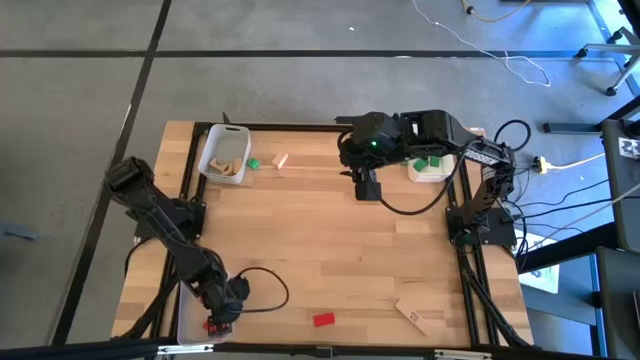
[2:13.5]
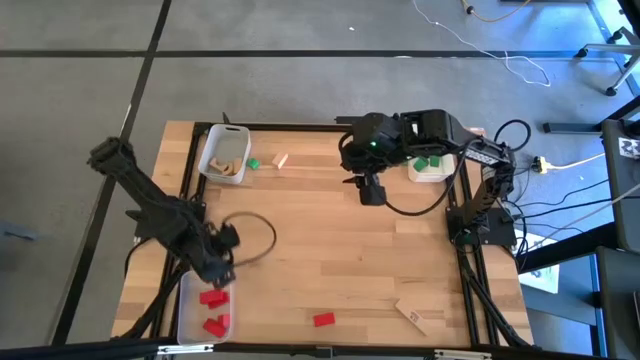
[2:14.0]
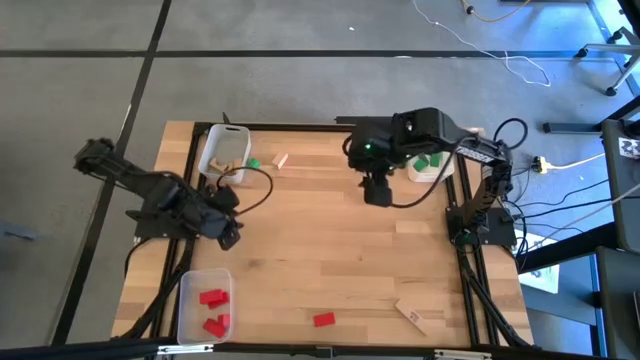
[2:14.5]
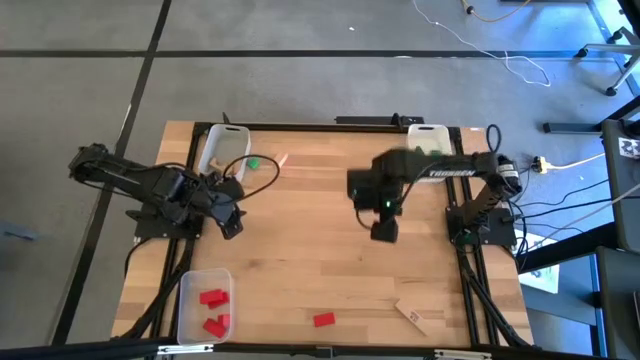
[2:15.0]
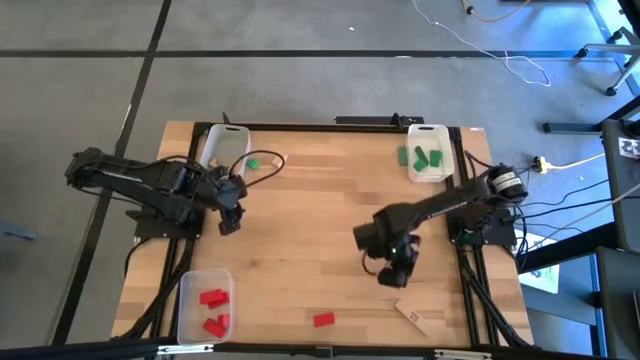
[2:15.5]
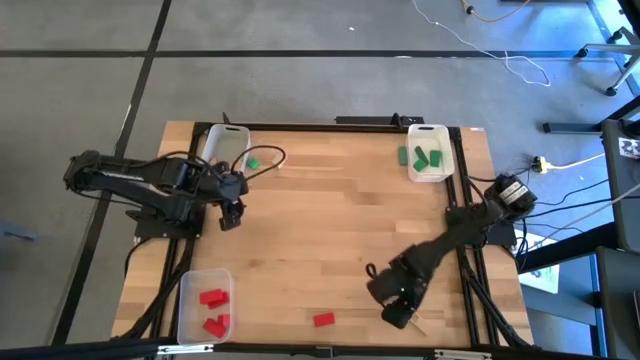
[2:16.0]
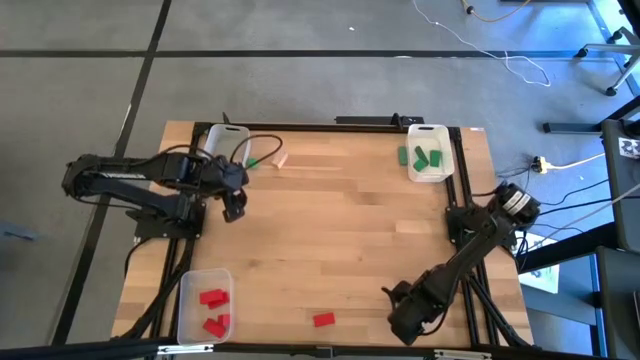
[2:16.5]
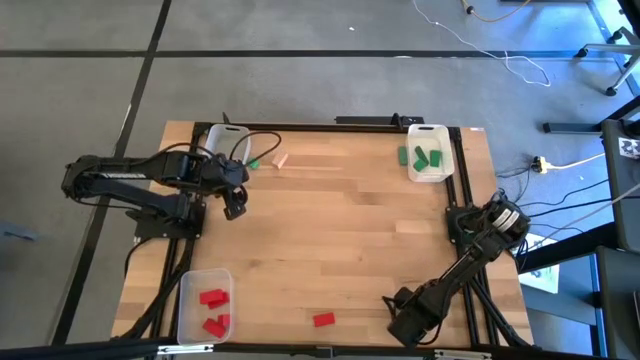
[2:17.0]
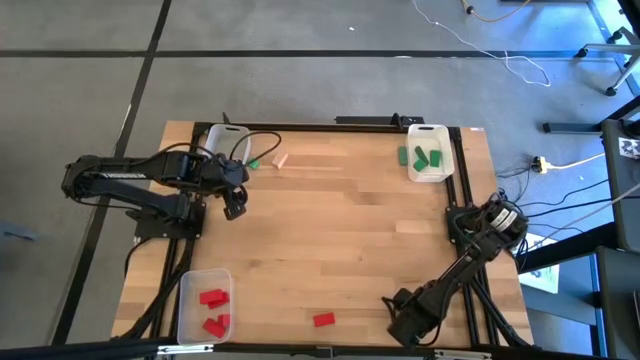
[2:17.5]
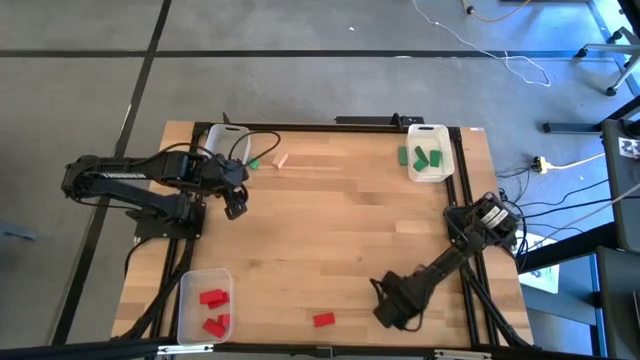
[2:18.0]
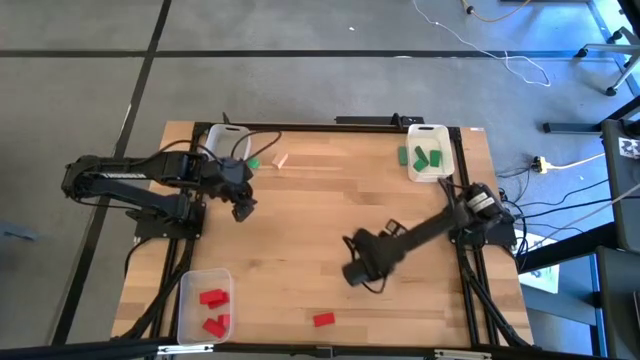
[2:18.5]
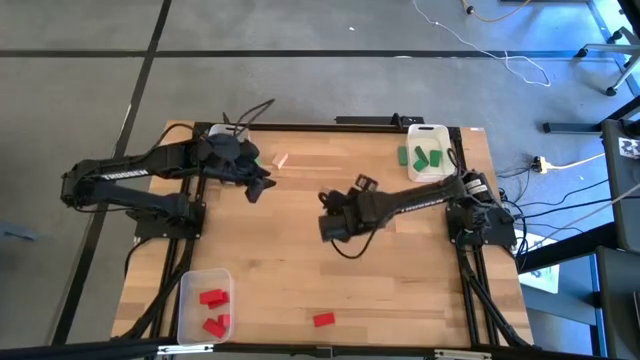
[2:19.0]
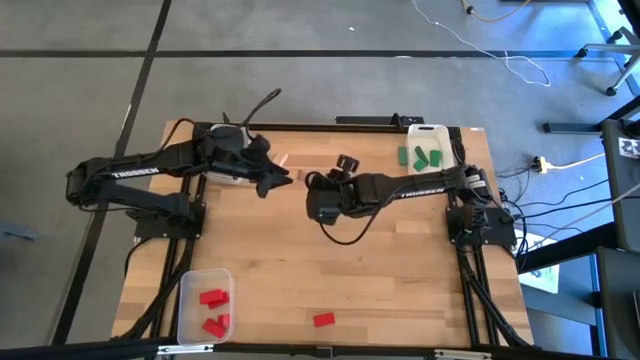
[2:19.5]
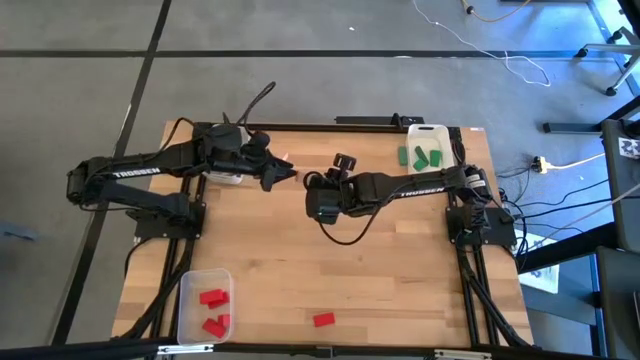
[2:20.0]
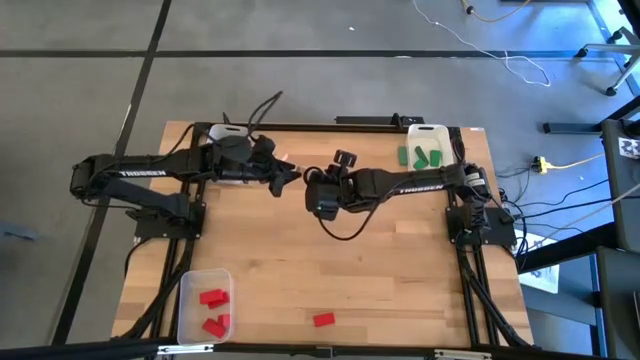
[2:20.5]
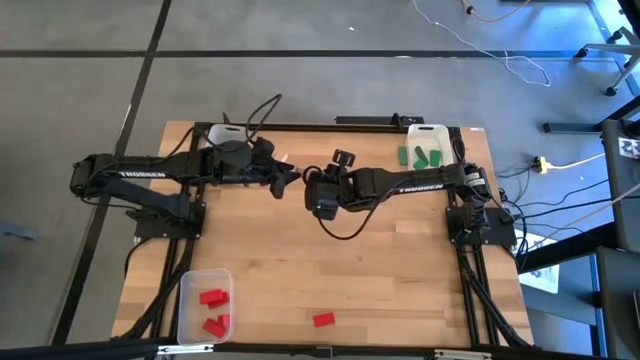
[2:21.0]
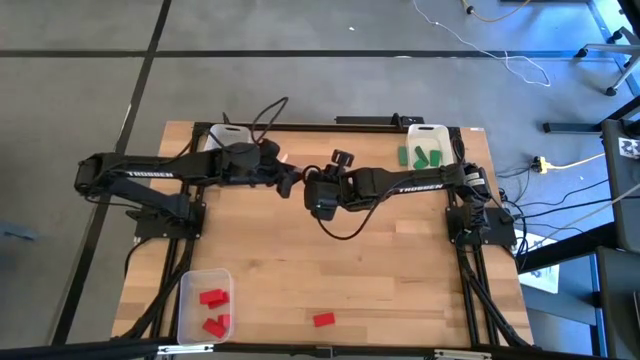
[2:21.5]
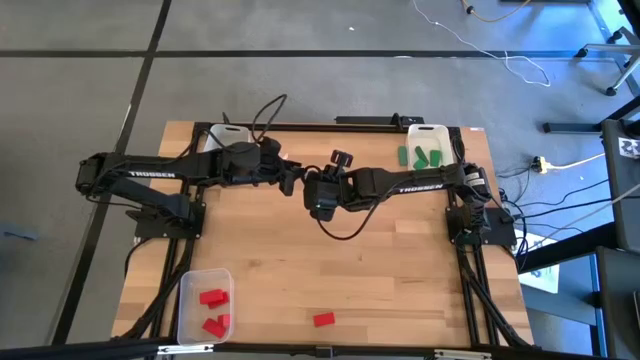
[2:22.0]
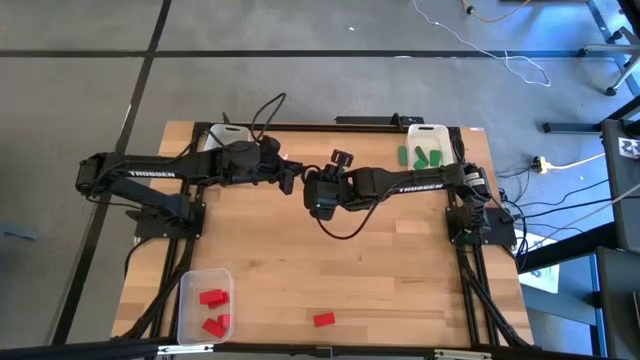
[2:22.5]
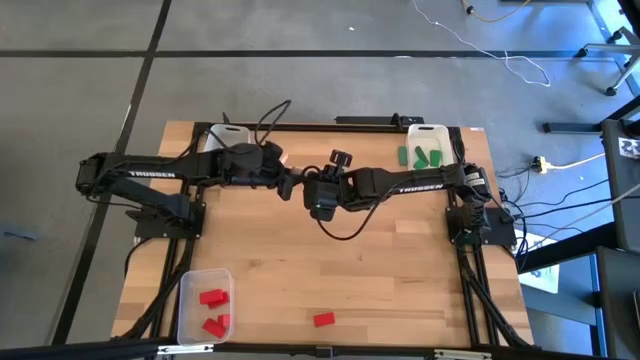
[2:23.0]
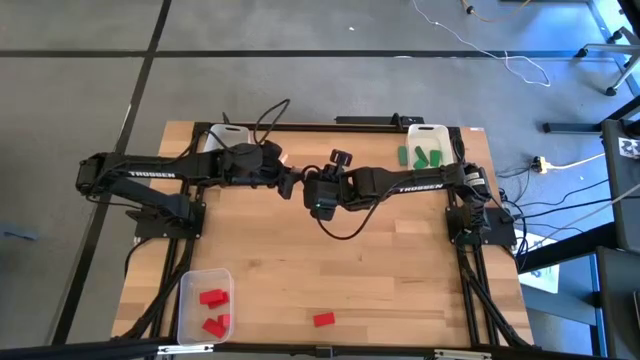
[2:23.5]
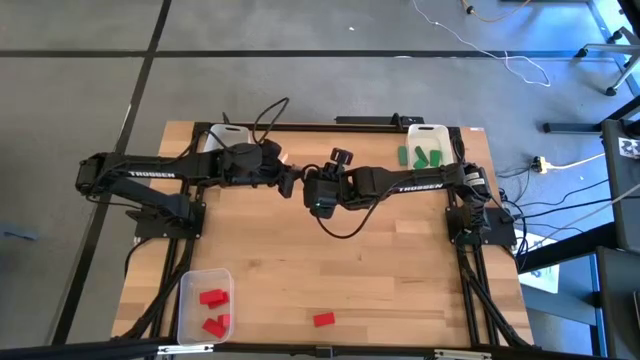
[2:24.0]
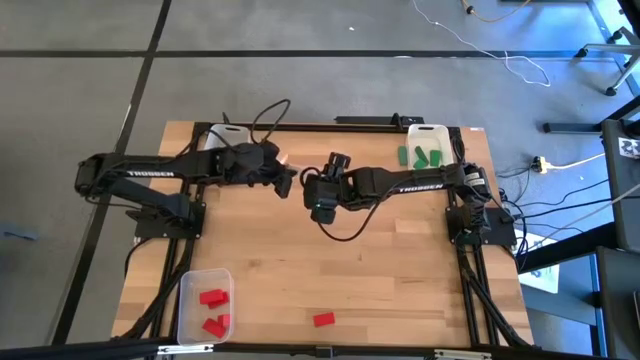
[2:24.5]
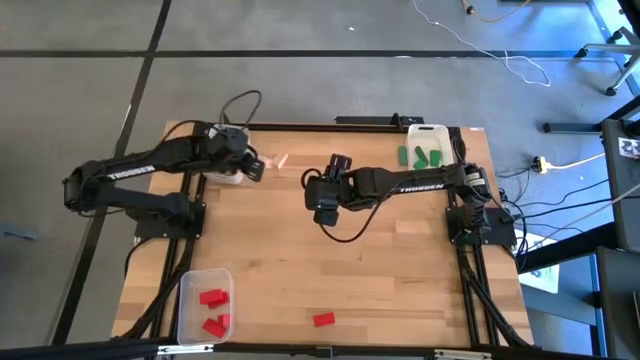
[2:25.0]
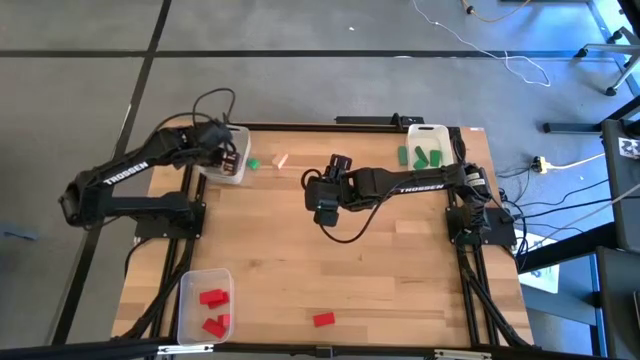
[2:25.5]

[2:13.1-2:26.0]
Task: Sort & place blocks by color
Put the brown block into the transparent bin

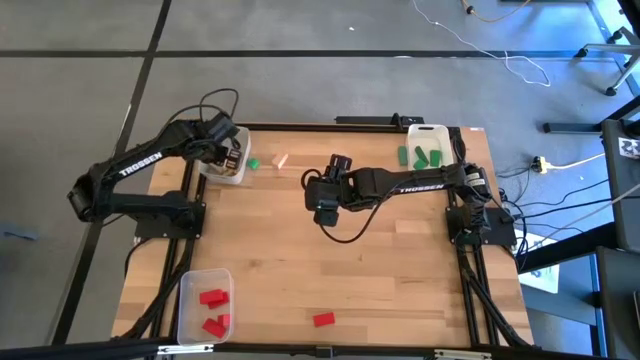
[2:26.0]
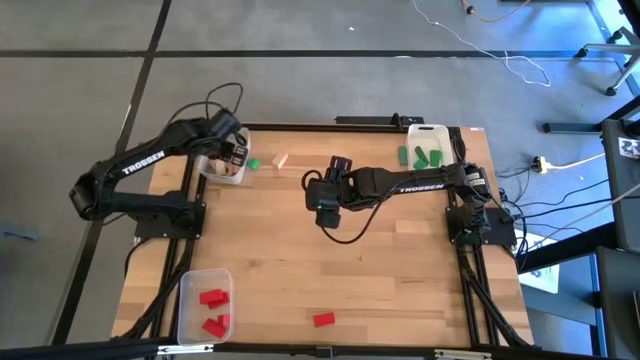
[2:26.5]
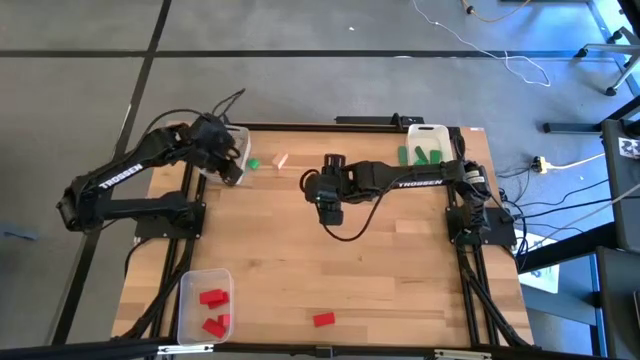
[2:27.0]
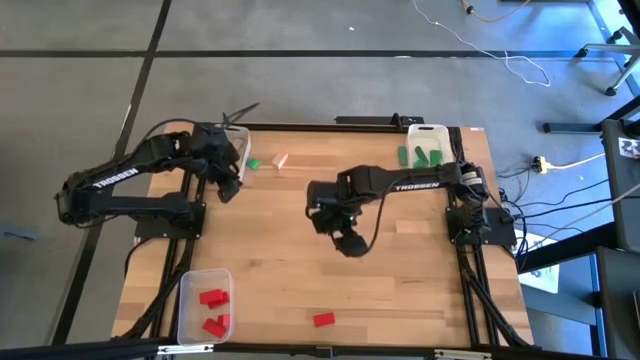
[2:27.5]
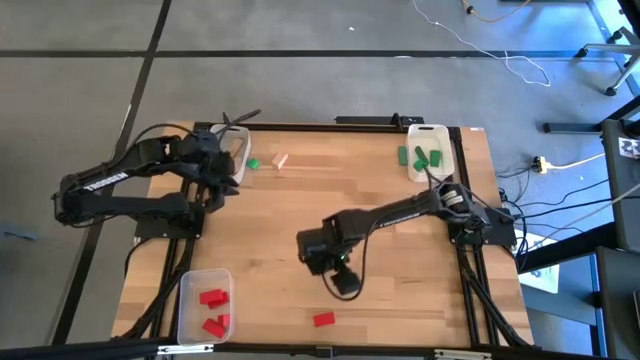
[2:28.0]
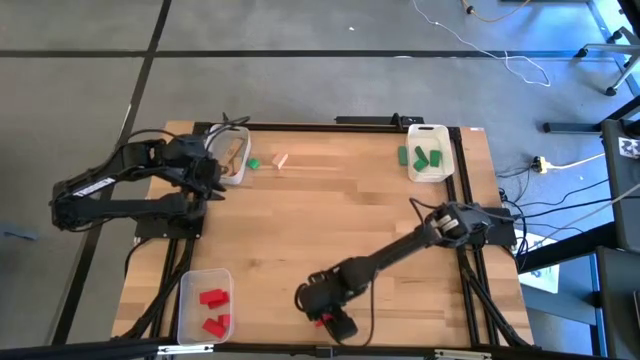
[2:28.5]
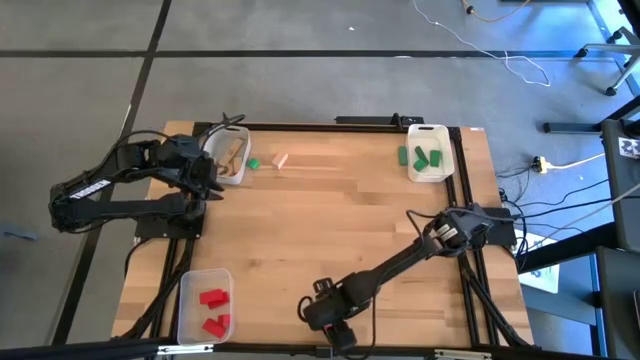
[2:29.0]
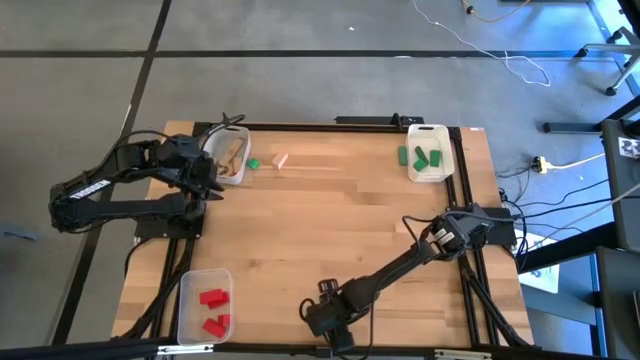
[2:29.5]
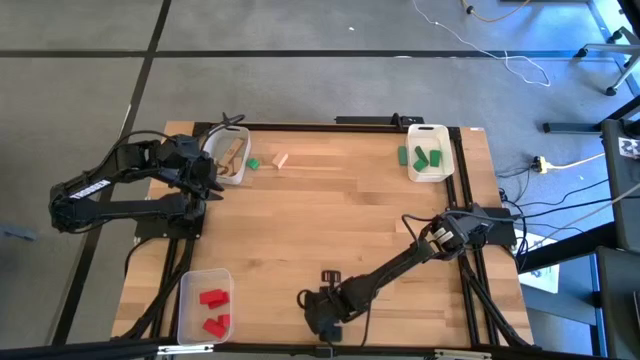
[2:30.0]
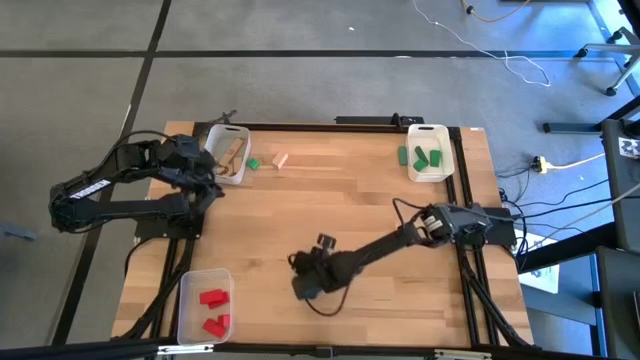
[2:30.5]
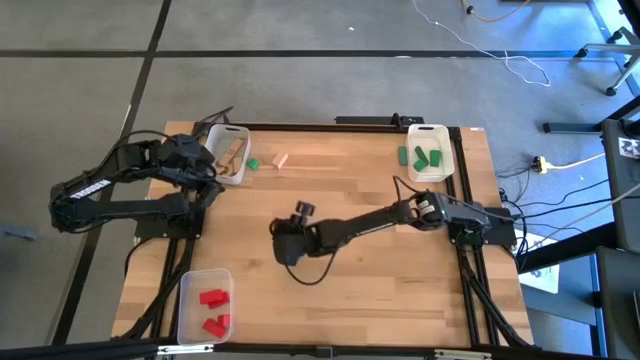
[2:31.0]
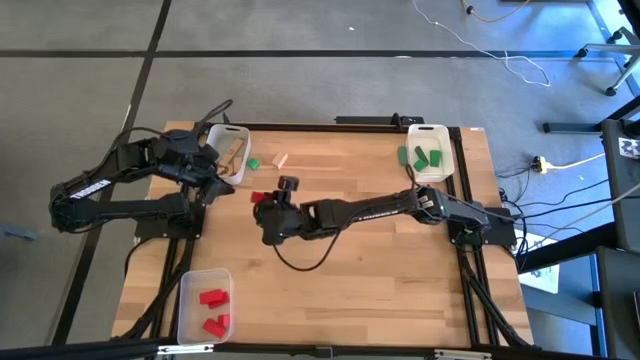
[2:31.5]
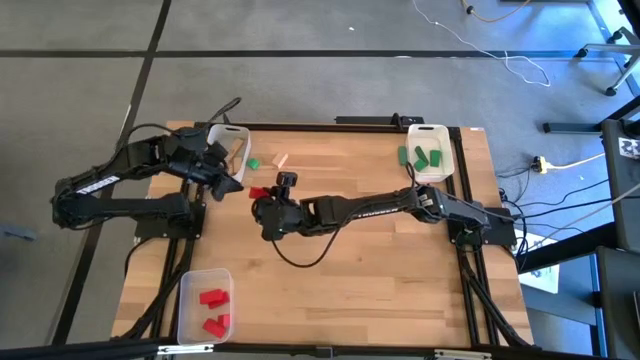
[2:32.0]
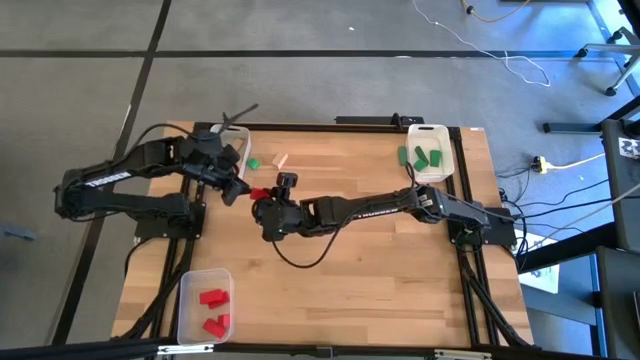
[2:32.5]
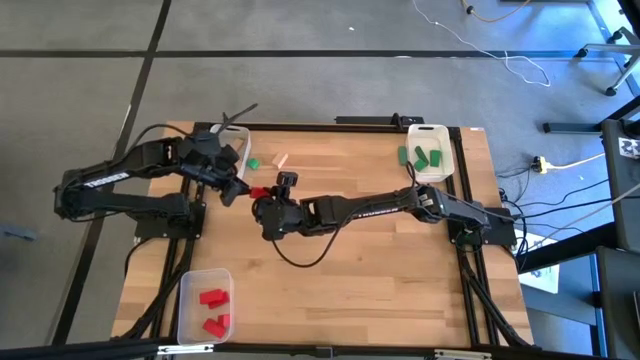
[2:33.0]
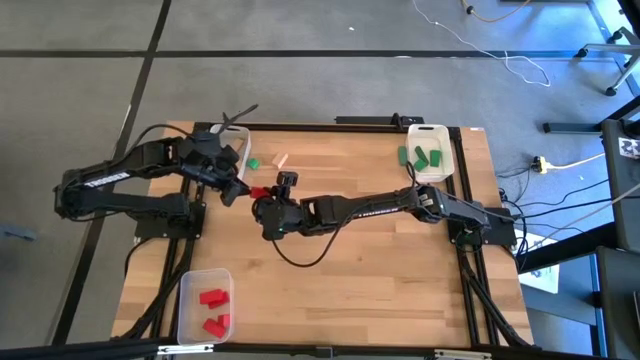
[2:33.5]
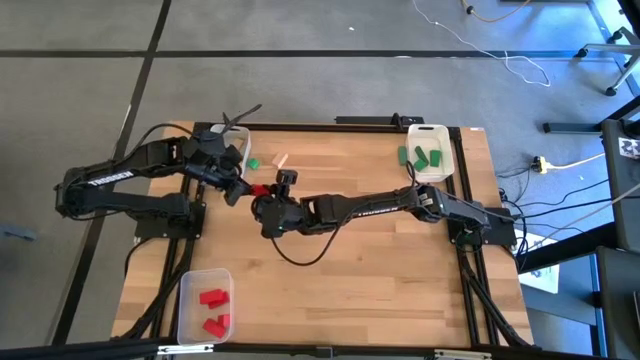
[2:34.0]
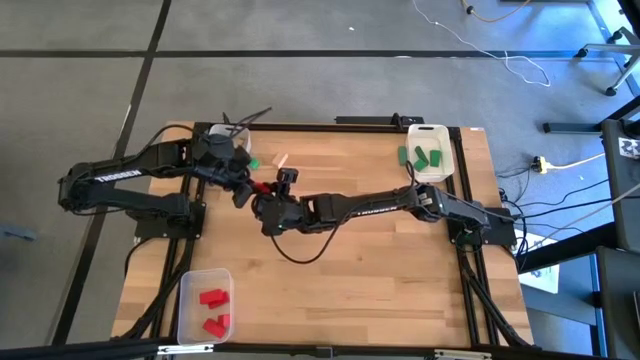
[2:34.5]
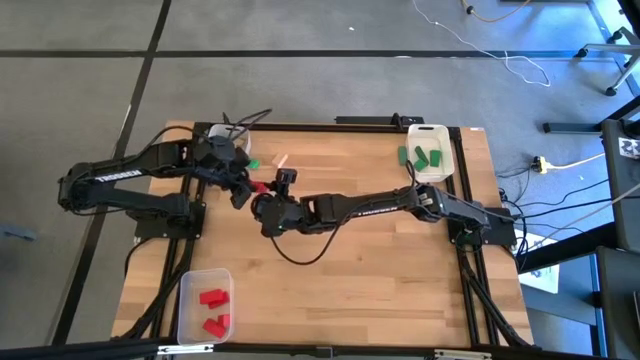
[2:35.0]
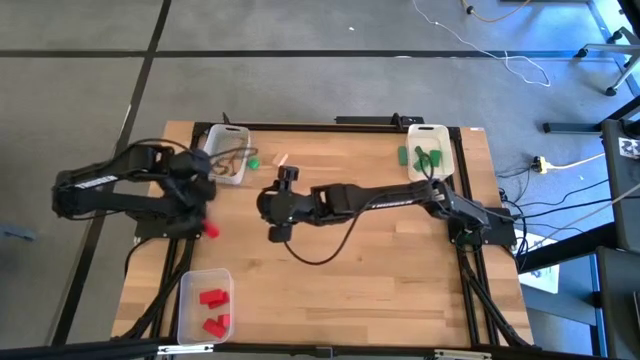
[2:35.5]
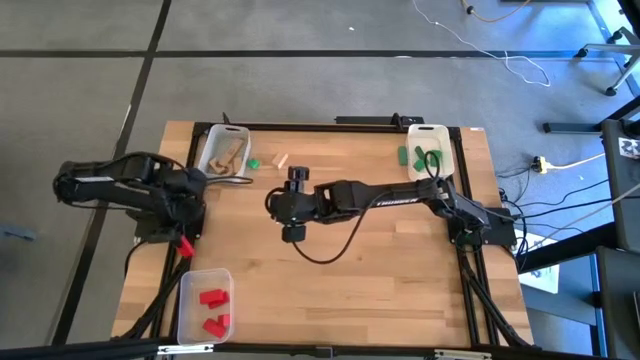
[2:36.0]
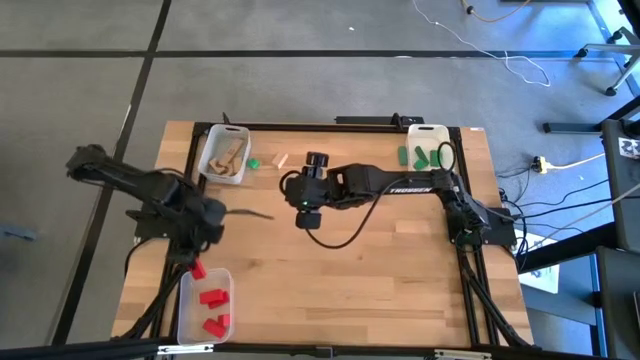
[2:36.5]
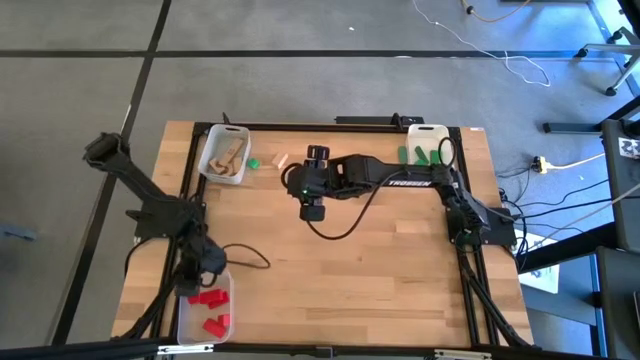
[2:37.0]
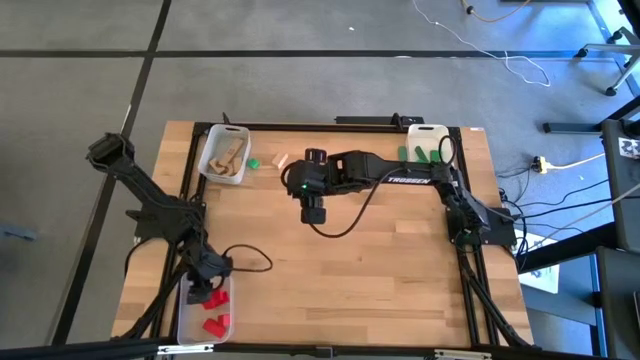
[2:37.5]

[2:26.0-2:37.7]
Put the red block into the transparent bin
